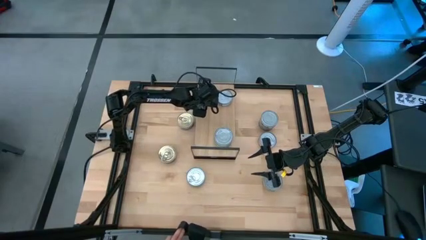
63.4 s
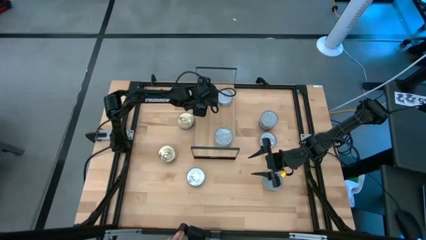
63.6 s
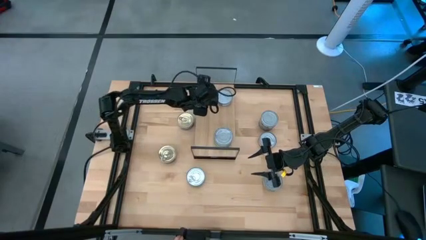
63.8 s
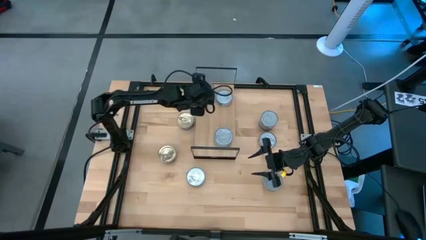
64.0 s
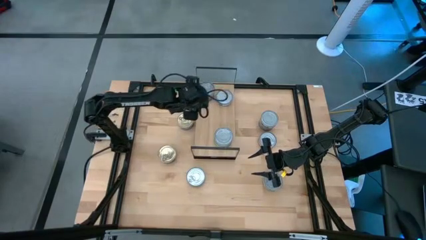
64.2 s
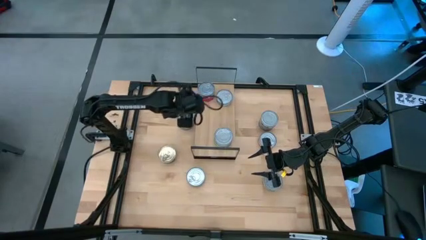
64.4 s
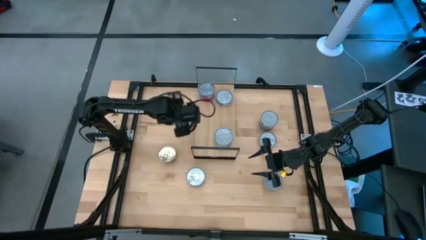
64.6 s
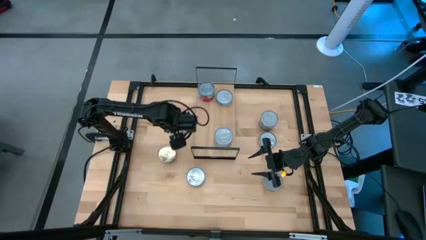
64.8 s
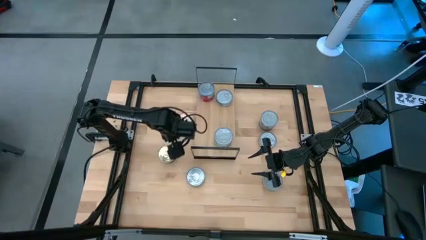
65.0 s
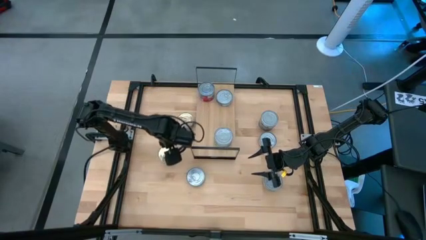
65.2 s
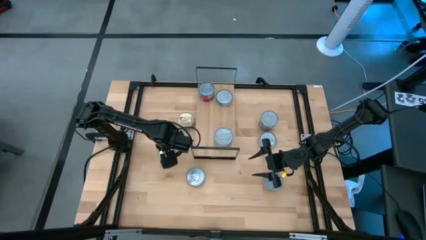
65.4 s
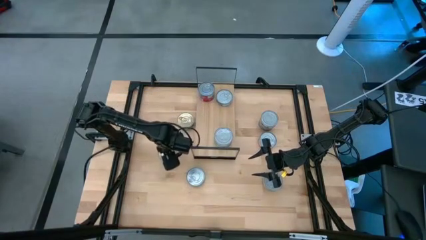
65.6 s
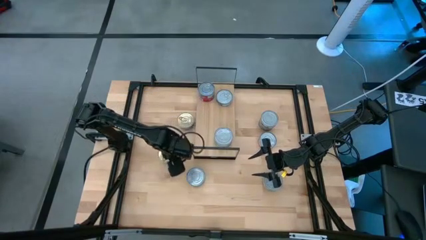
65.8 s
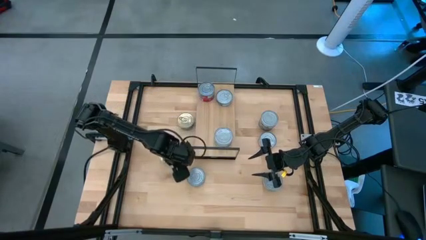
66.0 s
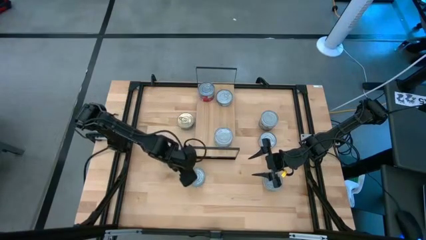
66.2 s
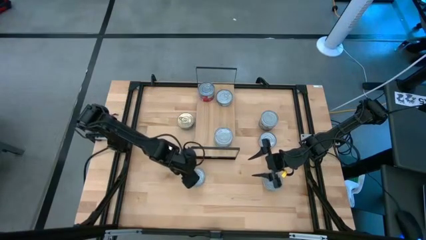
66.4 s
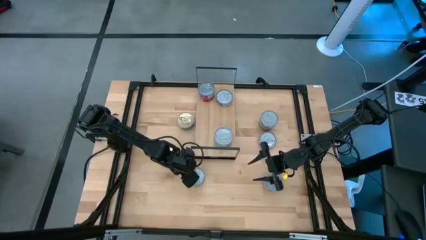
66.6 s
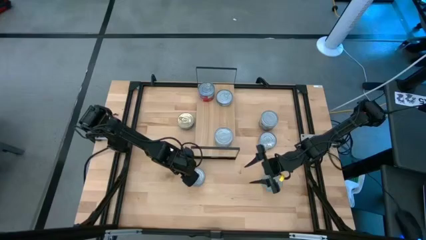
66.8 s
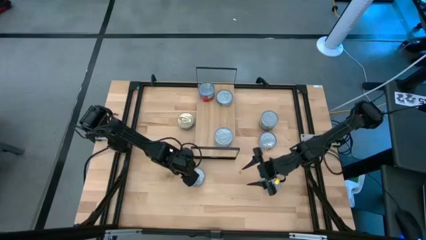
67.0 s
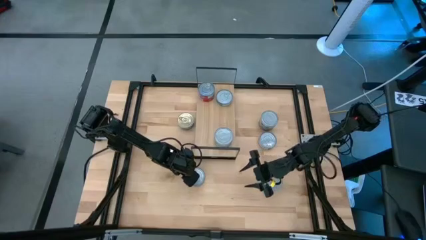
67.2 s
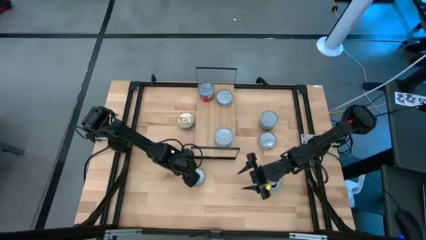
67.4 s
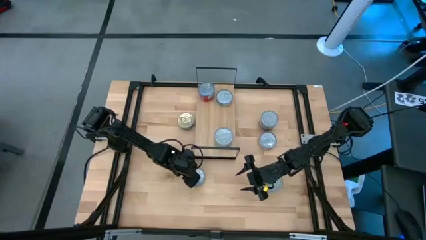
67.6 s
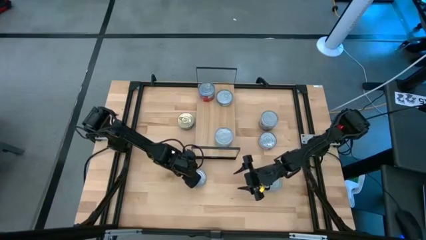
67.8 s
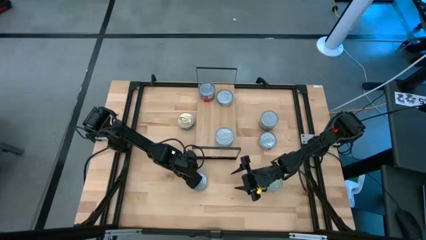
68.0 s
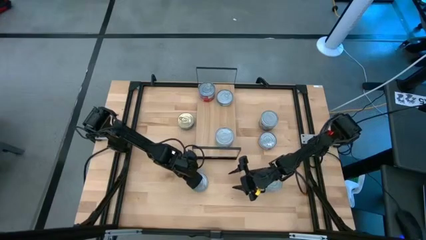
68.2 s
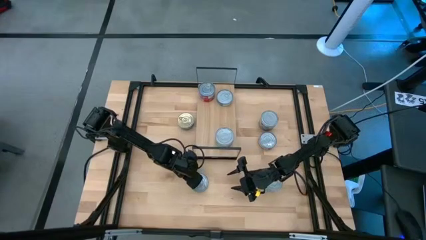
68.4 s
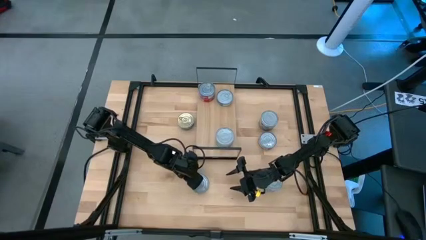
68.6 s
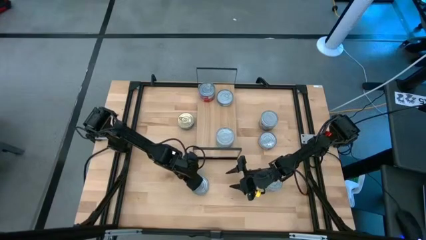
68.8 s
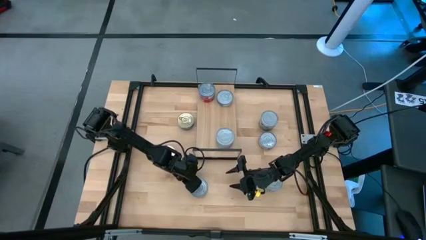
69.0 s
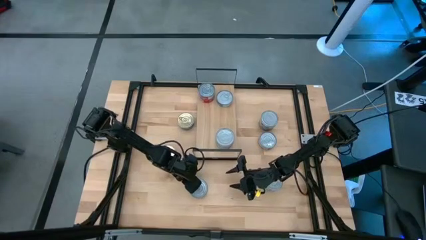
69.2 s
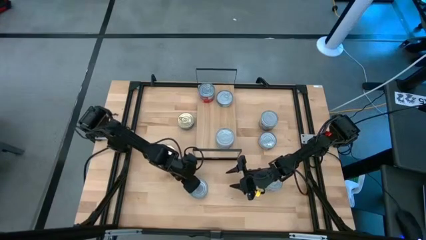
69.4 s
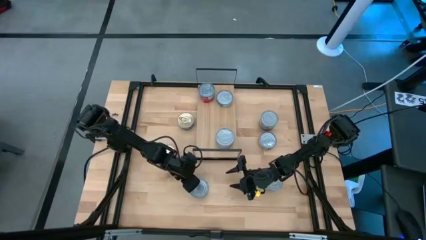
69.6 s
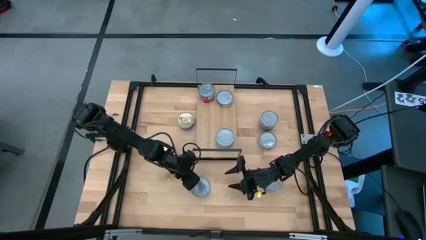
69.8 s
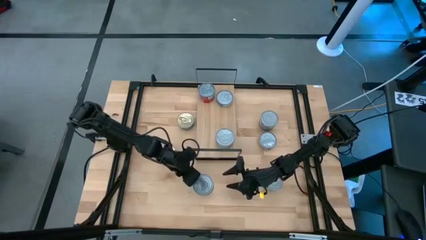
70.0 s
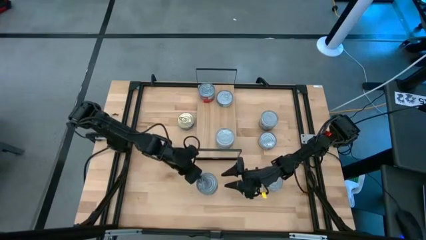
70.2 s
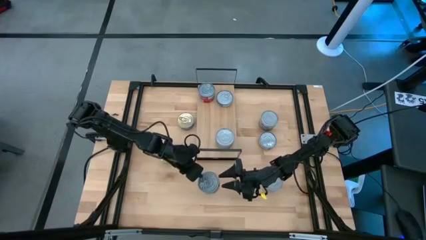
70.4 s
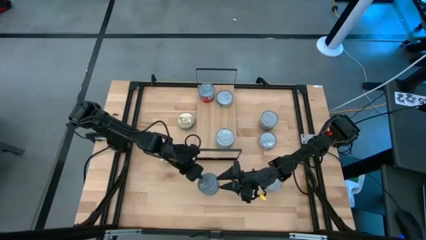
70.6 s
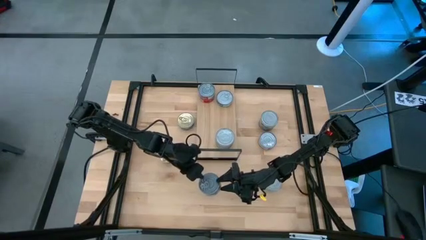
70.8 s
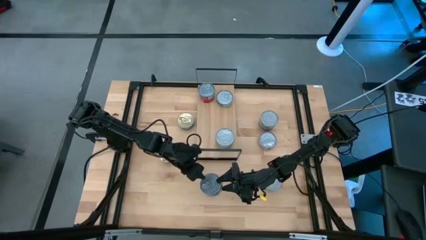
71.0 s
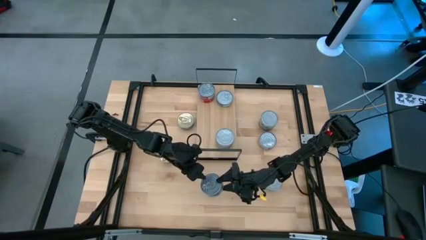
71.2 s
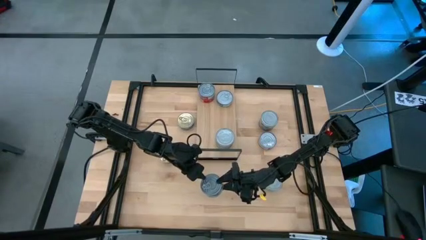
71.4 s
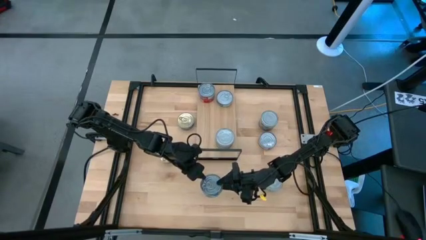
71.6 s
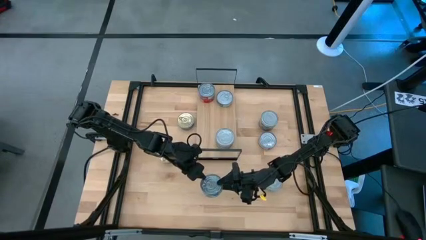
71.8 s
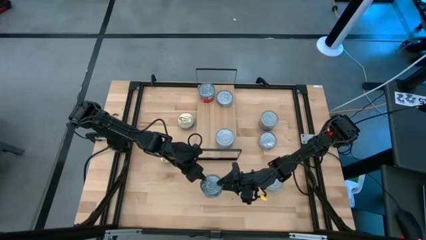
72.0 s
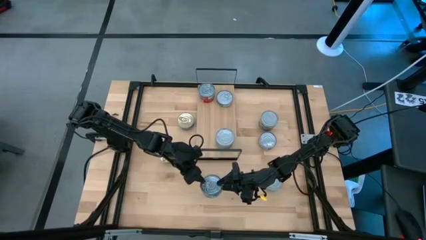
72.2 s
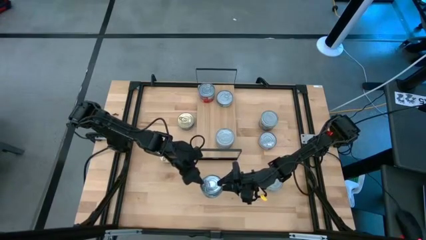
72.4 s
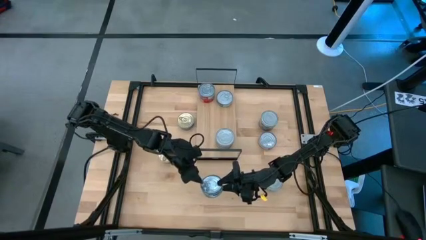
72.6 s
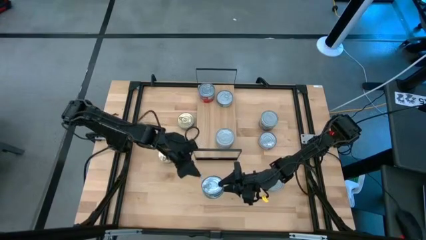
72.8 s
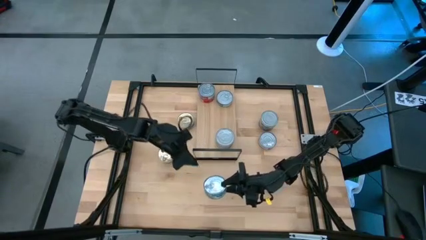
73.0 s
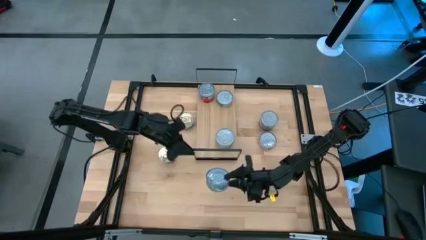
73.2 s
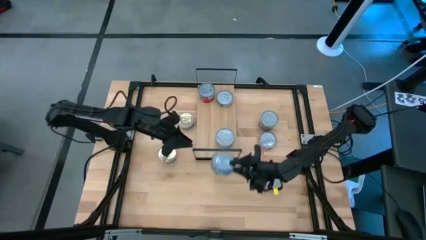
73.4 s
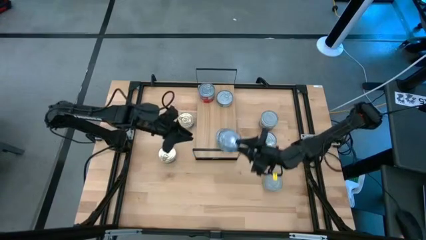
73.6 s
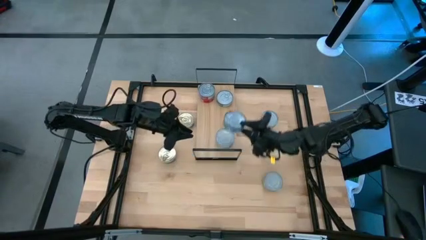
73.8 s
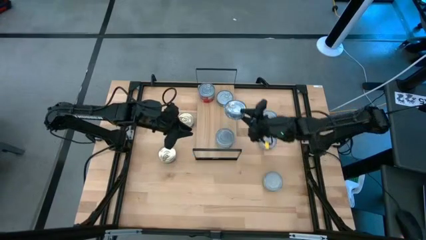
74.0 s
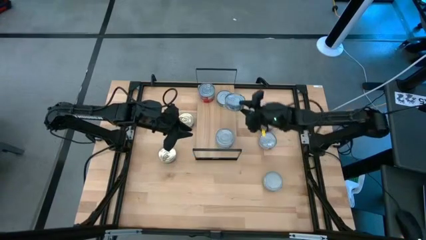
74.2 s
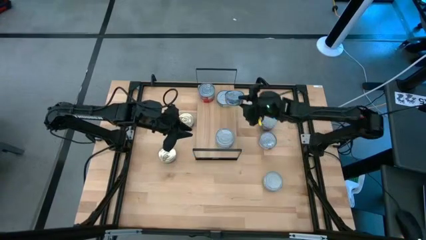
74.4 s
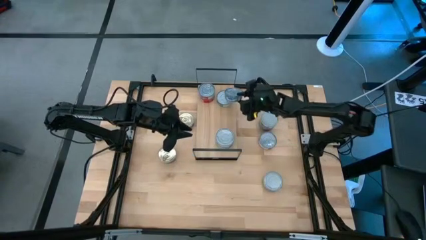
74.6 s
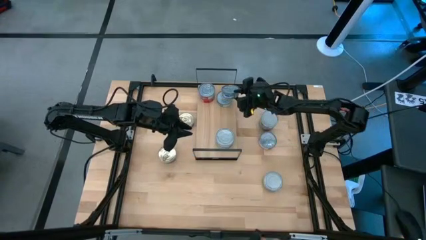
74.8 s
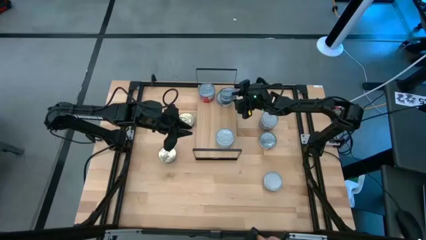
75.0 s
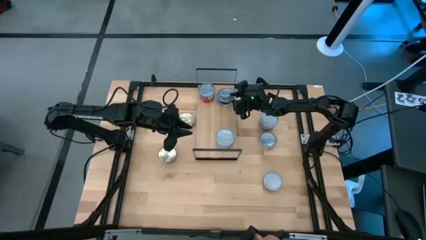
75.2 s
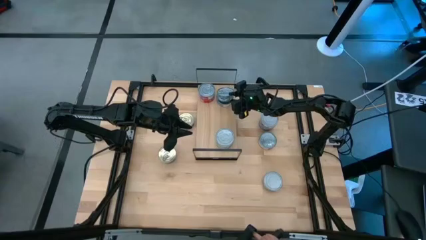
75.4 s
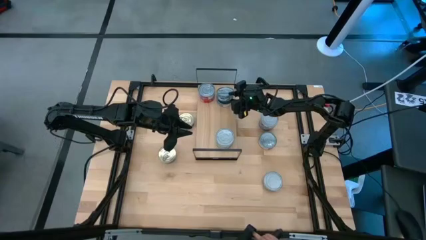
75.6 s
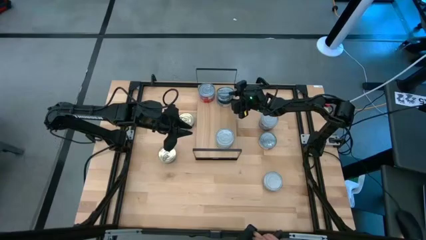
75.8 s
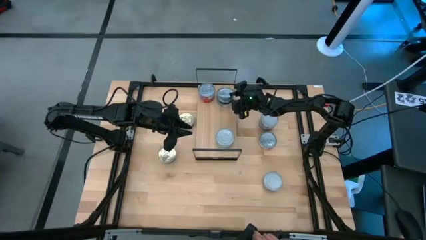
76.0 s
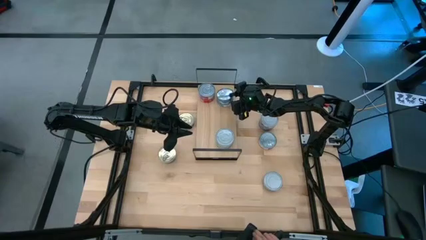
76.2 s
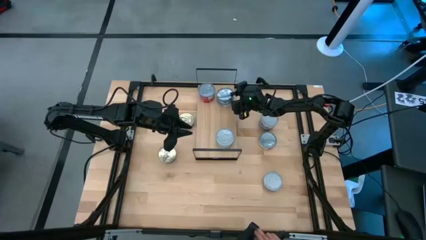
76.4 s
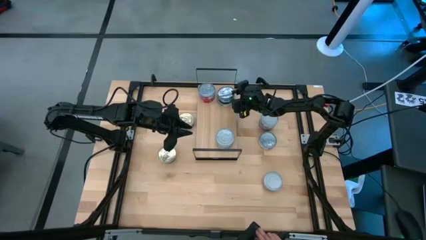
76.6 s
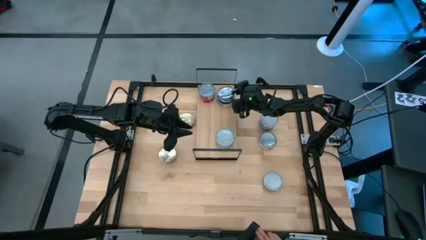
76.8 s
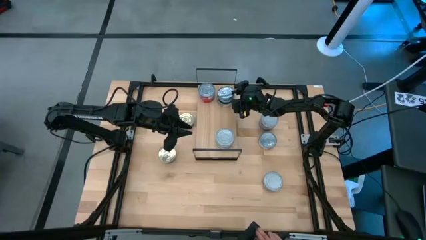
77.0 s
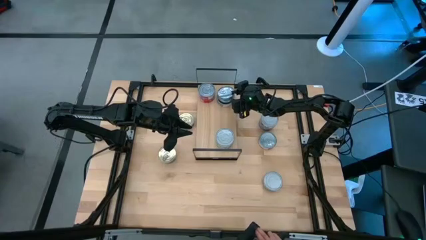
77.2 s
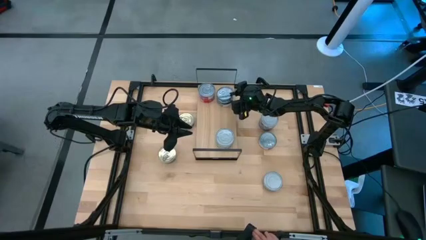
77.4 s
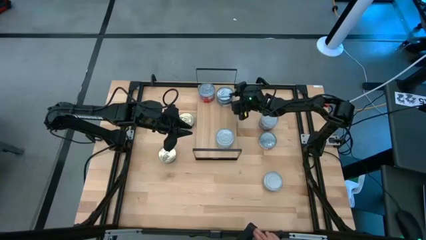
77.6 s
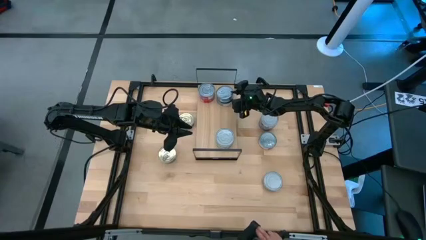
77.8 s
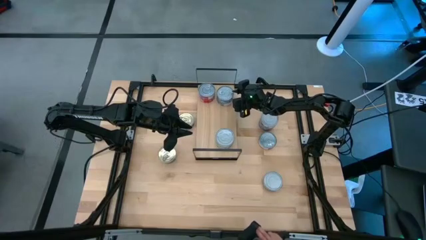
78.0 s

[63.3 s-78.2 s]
Task: Stack canned seafood by type on shelf
Stack the green tuna can on top of the other green tuna can
